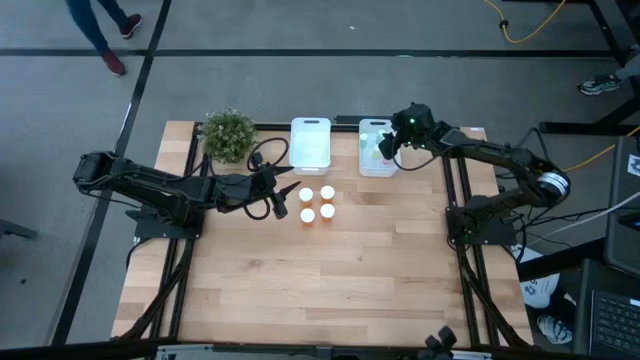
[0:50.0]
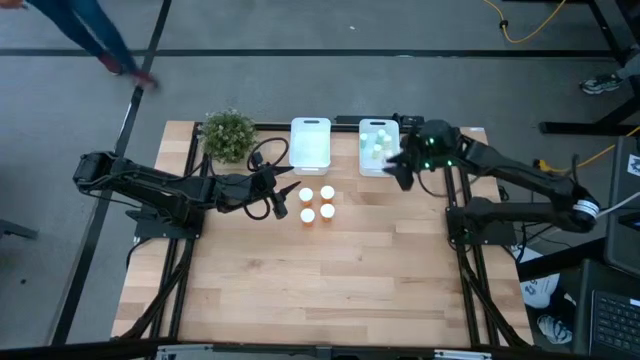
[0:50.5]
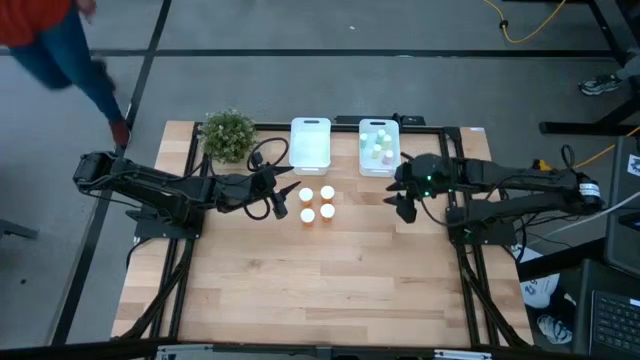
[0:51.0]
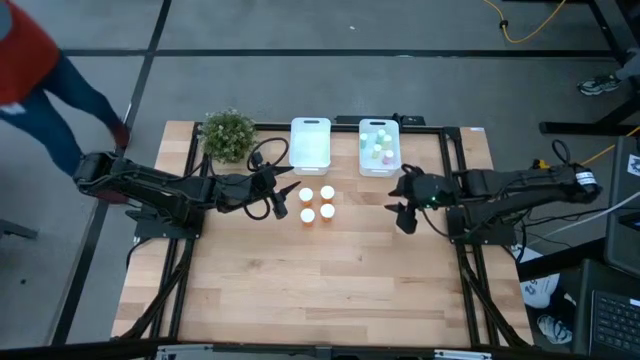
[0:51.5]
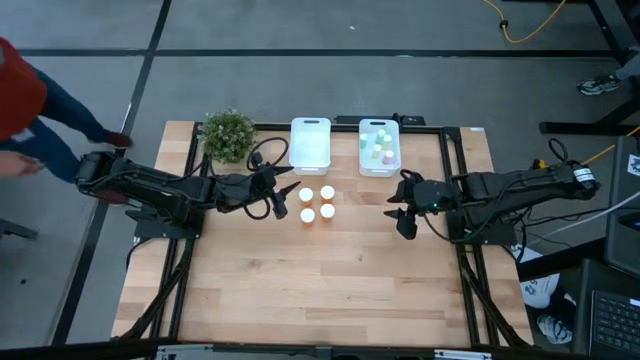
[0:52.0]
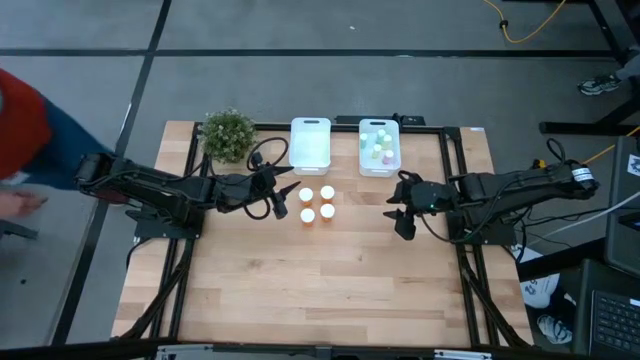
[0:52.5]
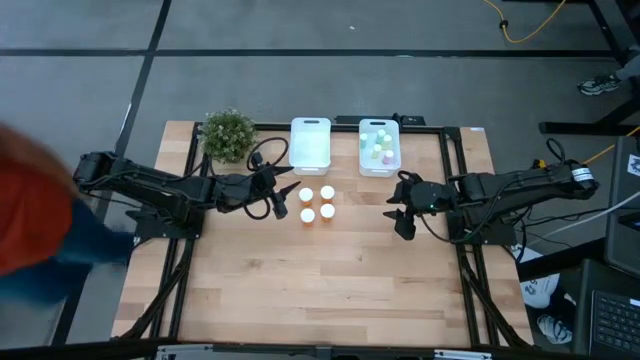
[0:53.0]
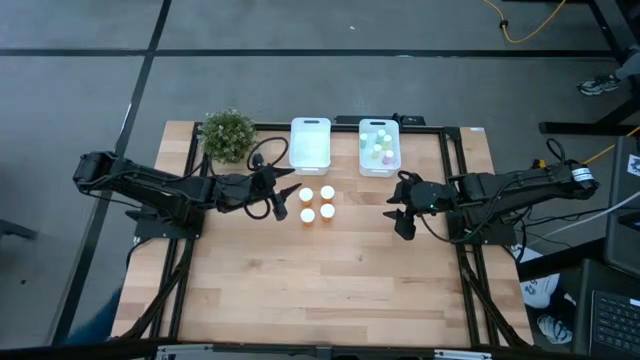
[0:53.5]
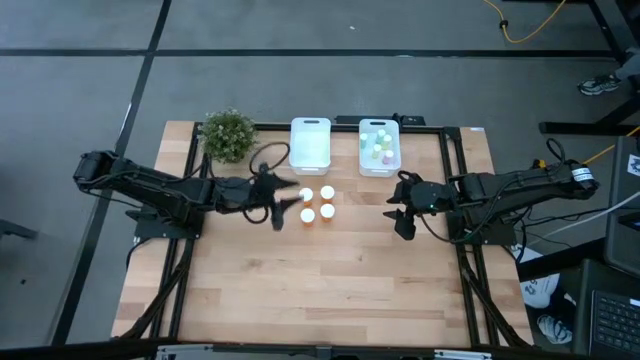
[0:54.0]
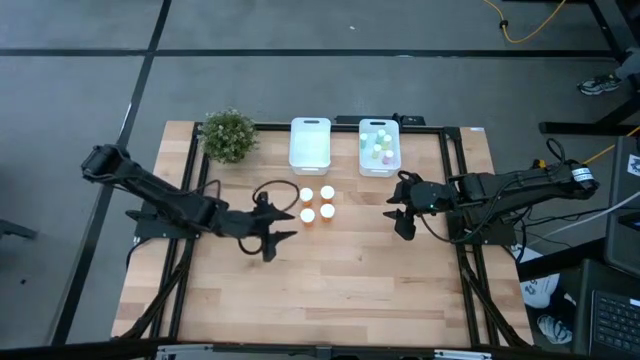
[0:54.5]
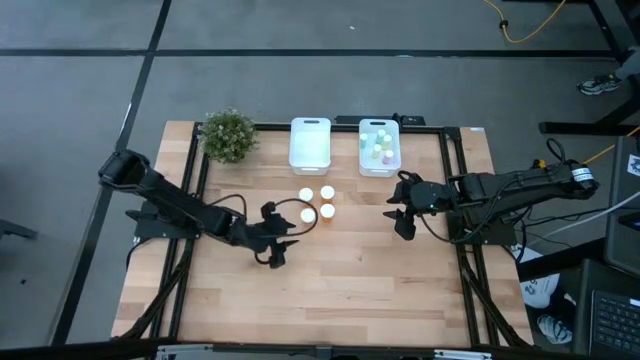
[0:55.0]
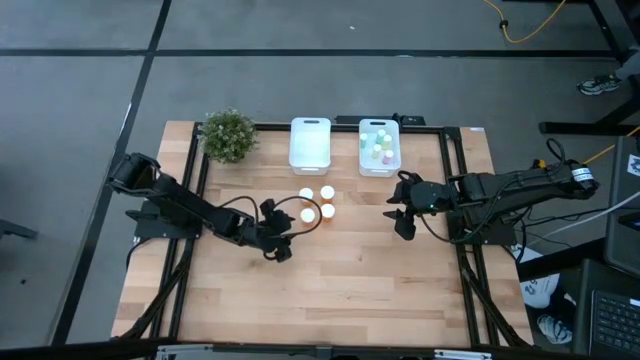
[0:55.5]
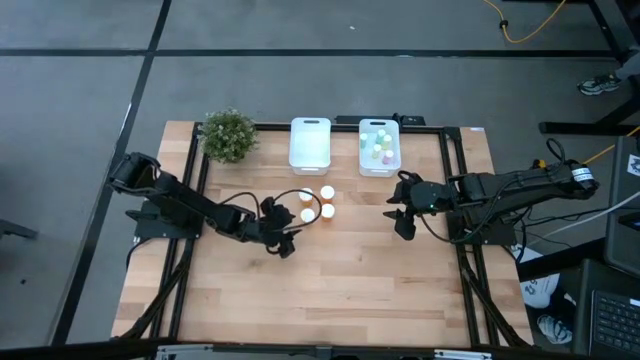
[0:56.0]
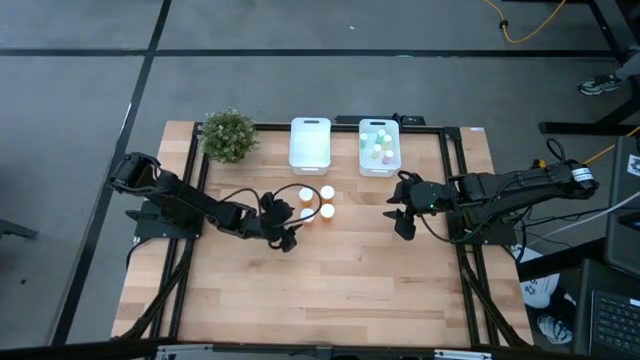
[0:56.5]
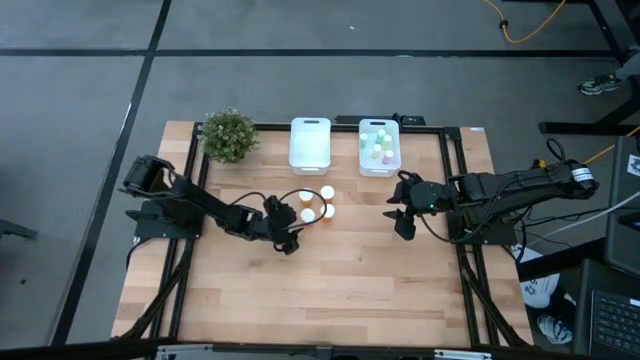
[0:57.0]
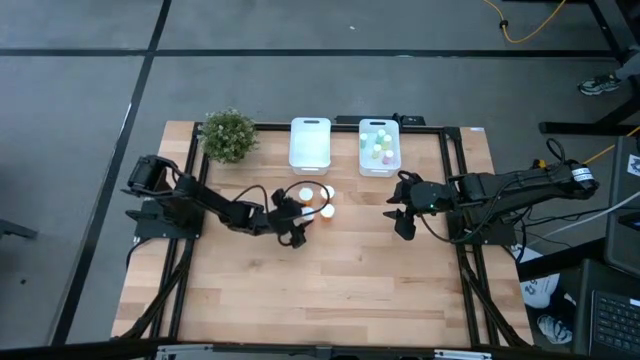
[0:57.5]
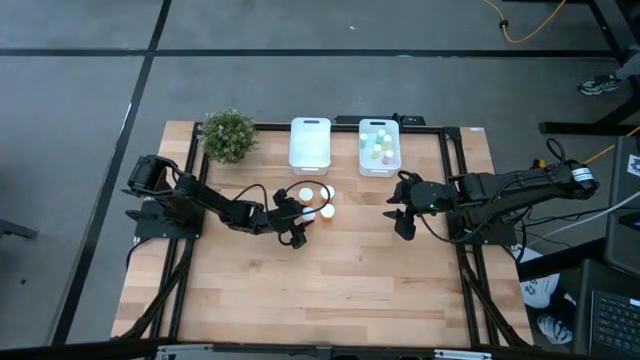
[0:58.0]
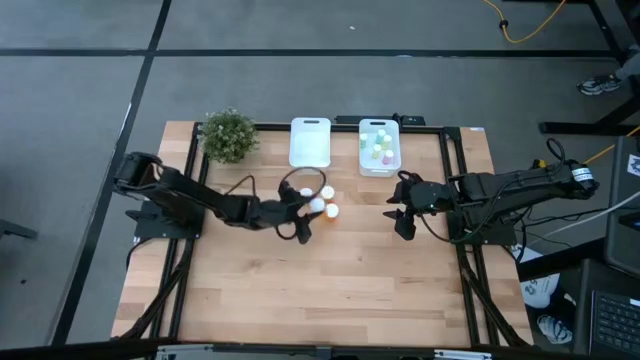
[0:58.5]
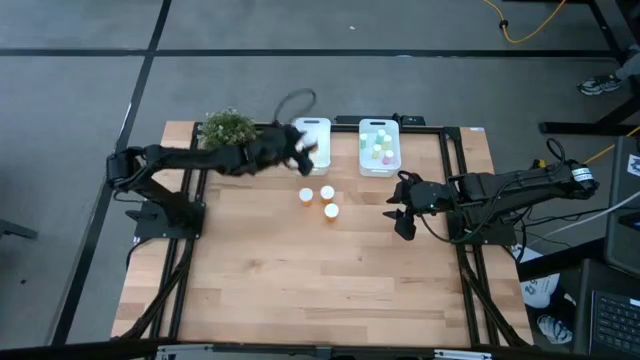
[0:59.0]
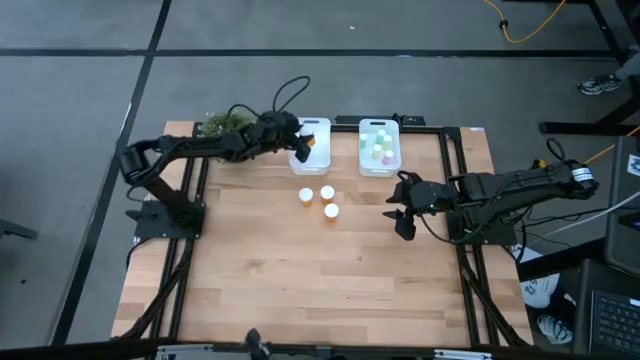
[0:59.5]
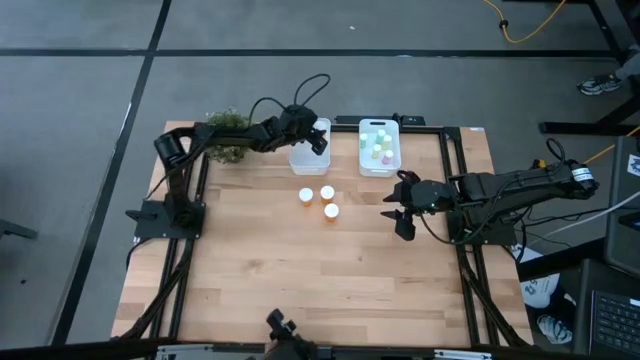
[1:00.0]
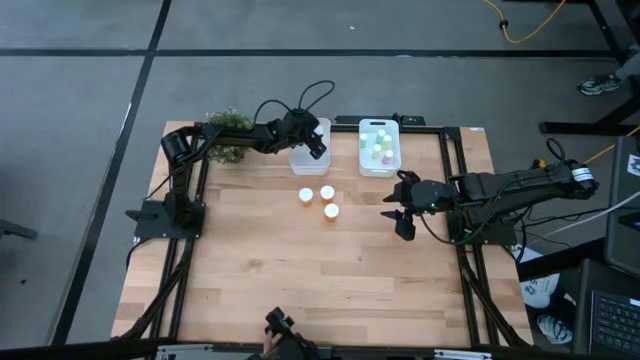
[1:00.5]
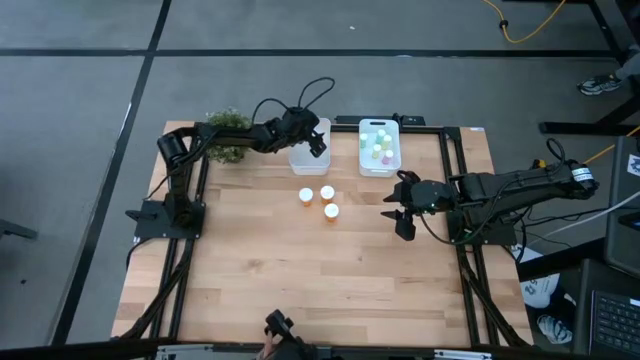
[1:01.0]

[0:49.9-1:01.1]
Task: Pick and place medicine bottles into bin by pill shape (circle, oval)
Put the orange pill bottle into the left white bin

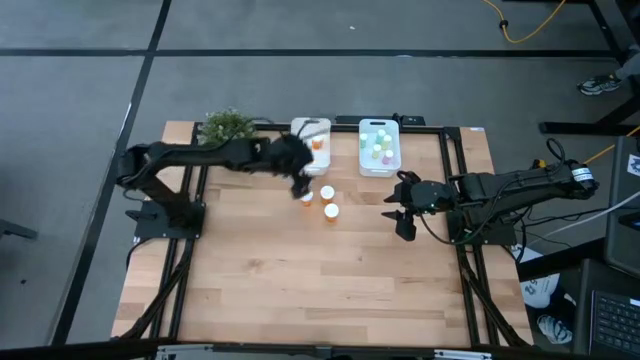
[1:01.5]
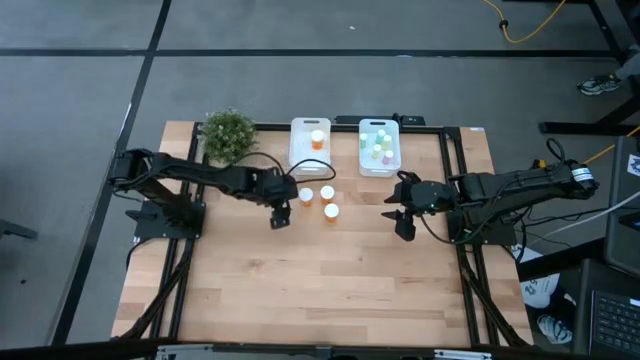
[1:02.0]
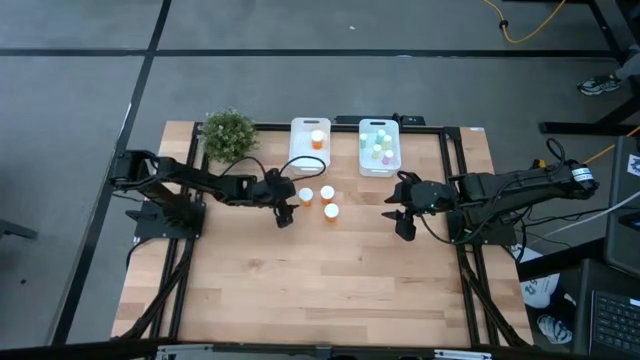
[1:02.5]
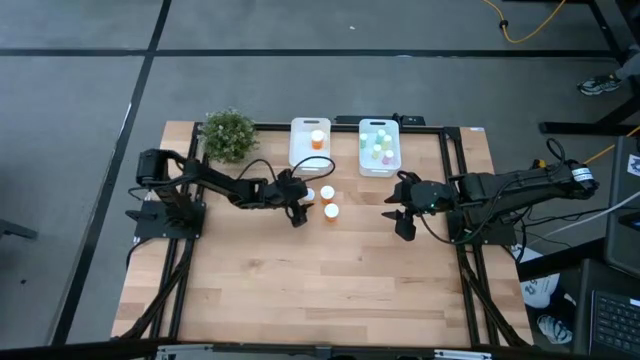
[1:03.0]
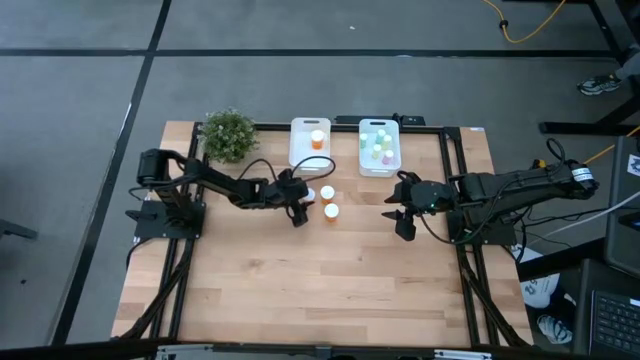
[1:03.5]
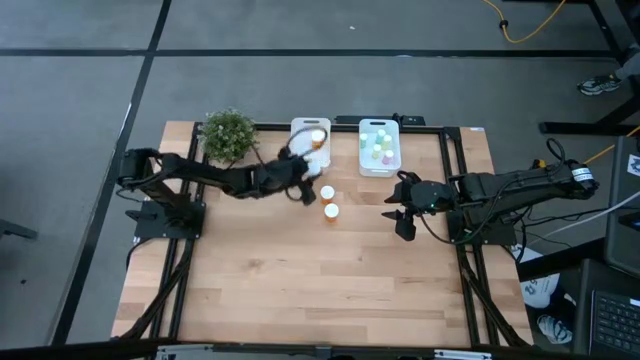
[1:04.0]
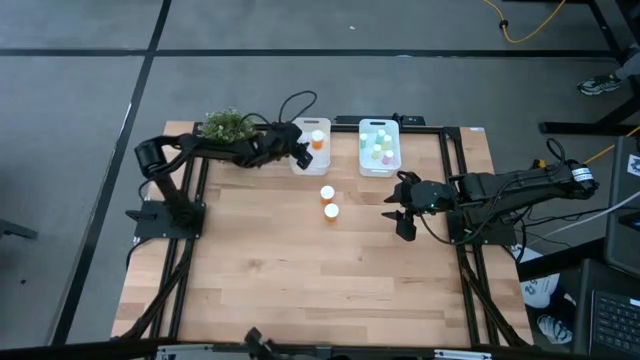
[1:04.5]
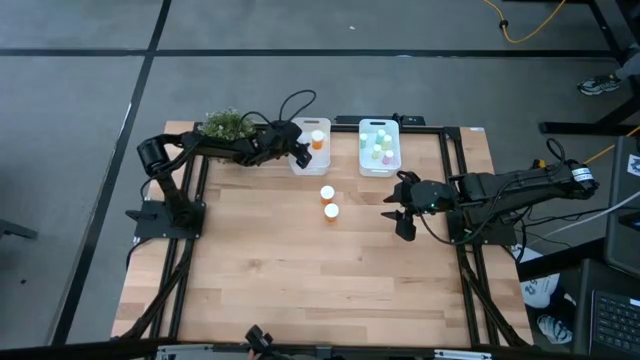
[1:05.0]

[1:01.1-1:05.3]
Put the orange pill bottle into the left white bin

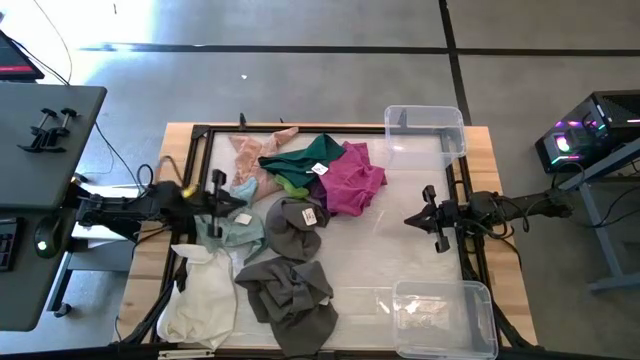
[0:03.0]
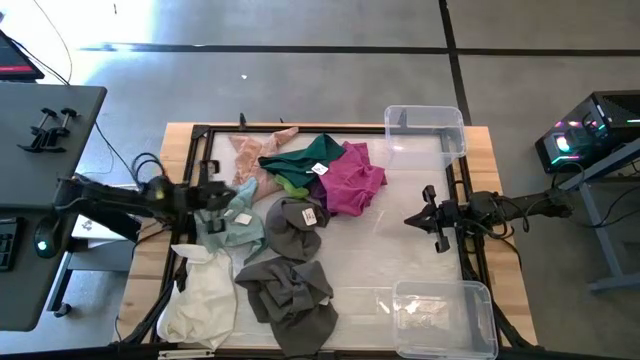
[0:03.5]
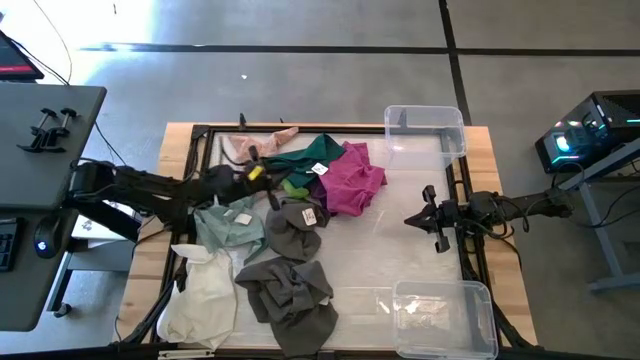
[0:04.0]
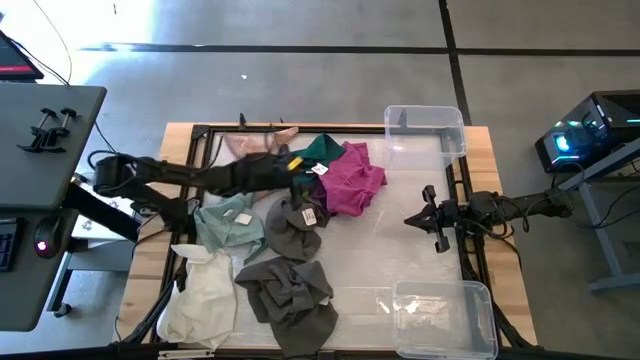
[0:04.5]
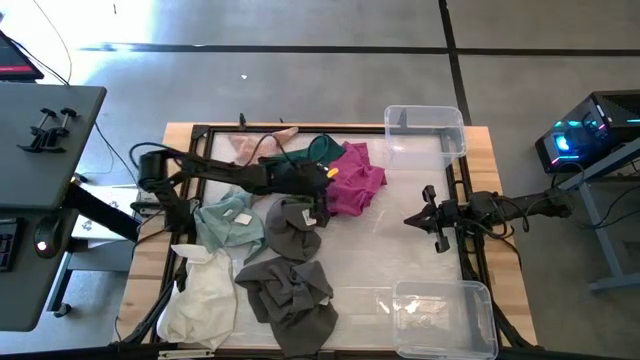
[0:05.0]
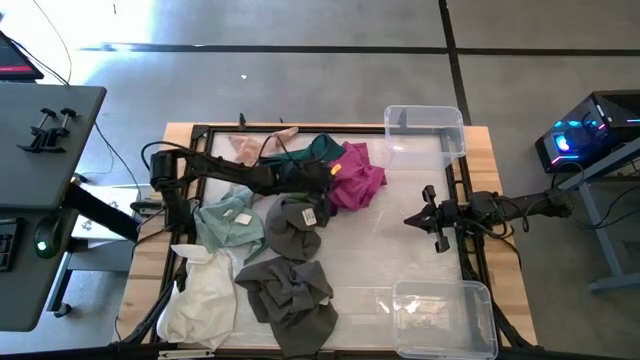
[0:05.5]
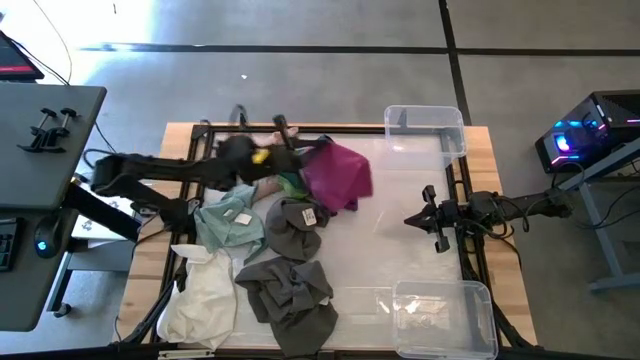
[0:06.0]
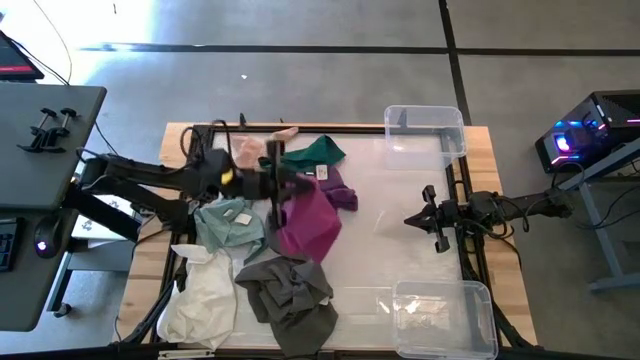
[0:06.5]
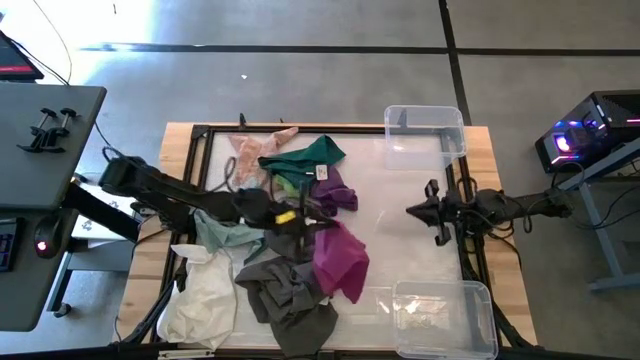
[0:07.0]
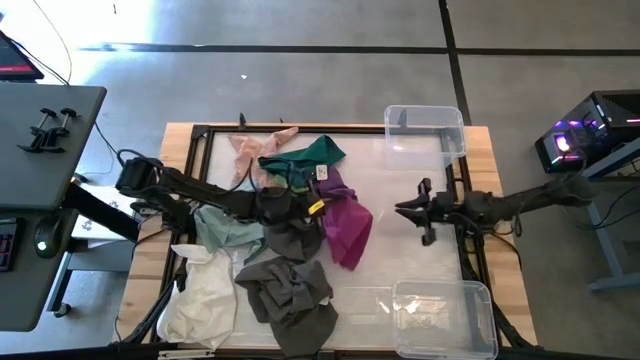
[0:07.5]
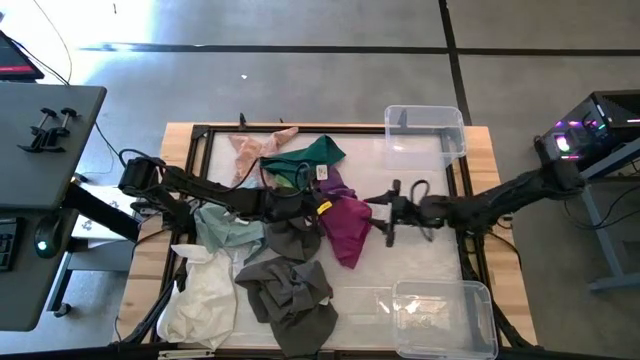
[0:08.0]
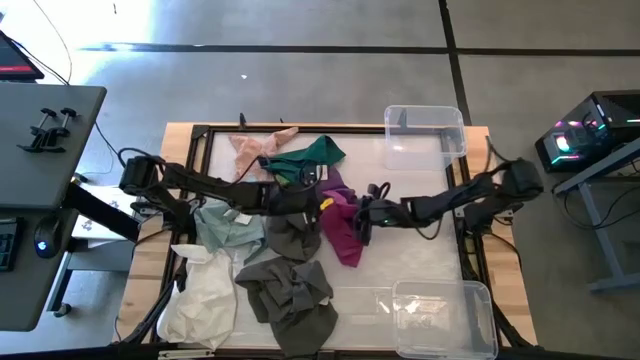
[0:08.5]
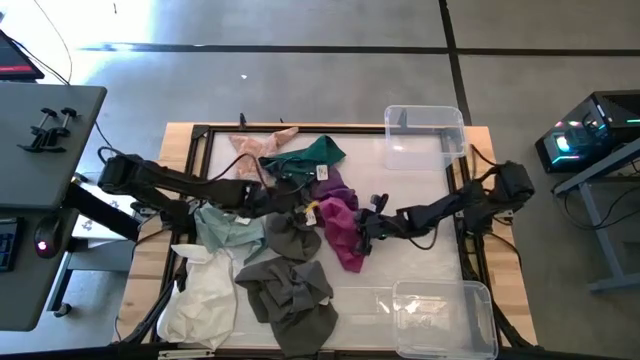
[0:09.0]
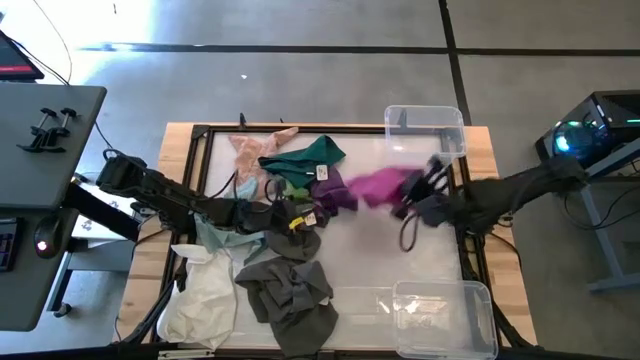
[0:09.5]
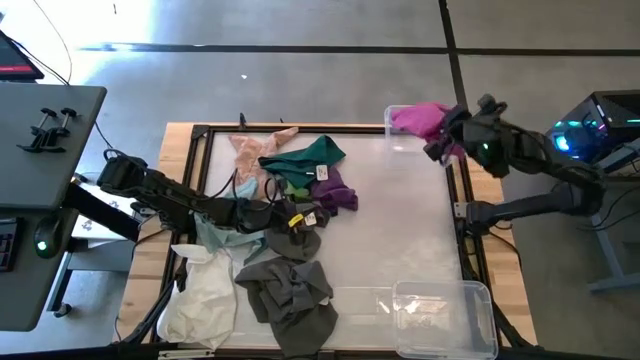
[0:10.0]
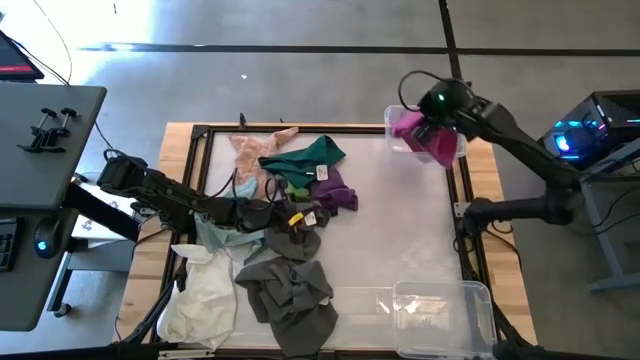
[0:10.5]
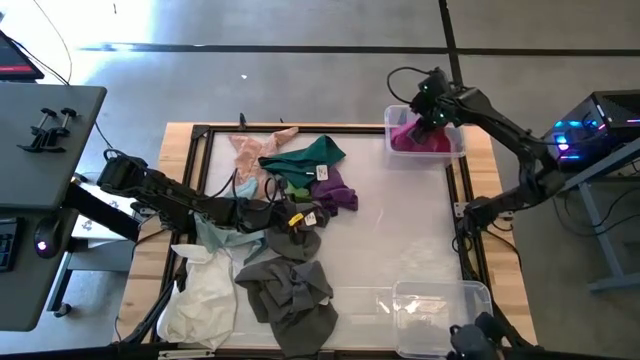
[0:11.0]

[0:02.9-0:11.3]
Task: Sort towels by color in basket
Put the pink towel into the top transparent bin
